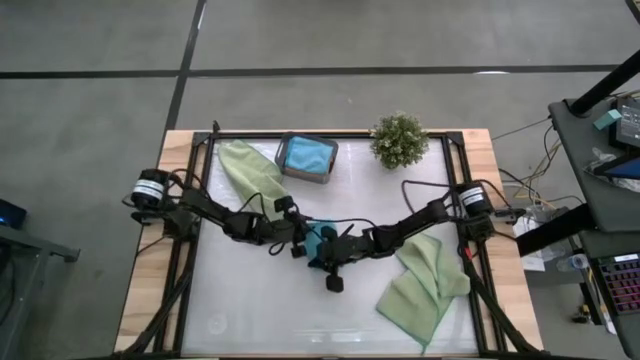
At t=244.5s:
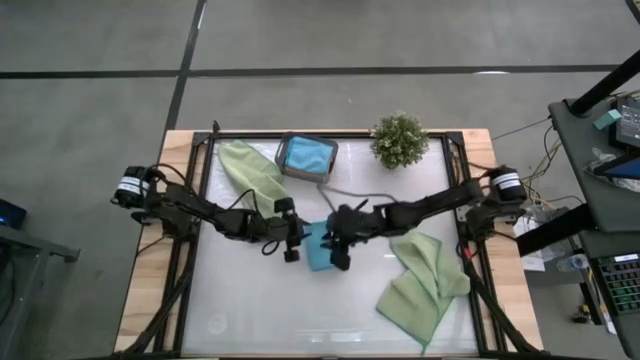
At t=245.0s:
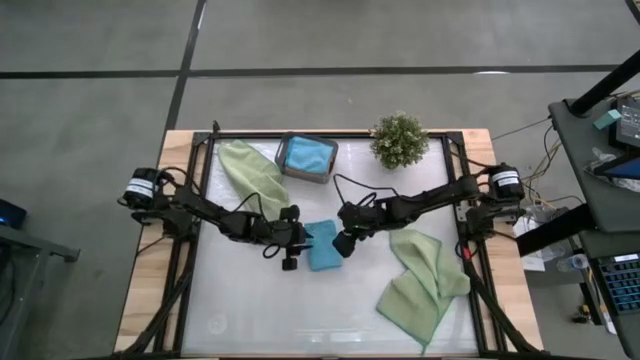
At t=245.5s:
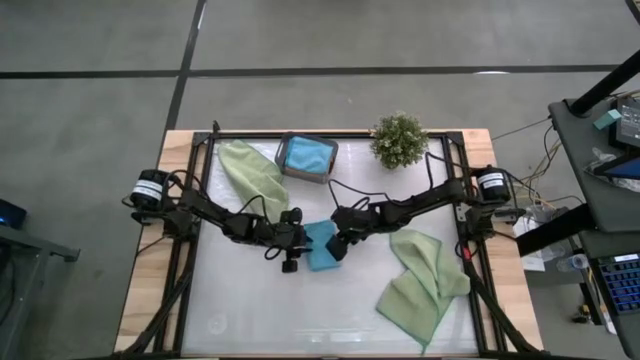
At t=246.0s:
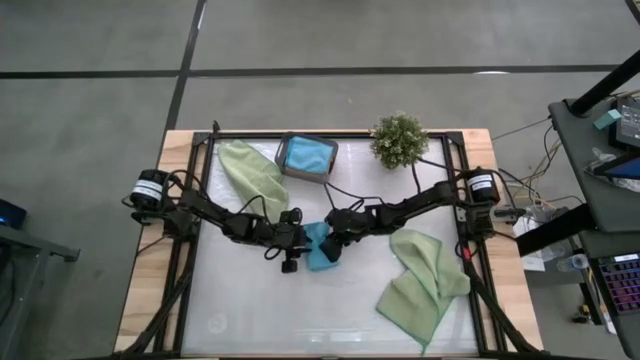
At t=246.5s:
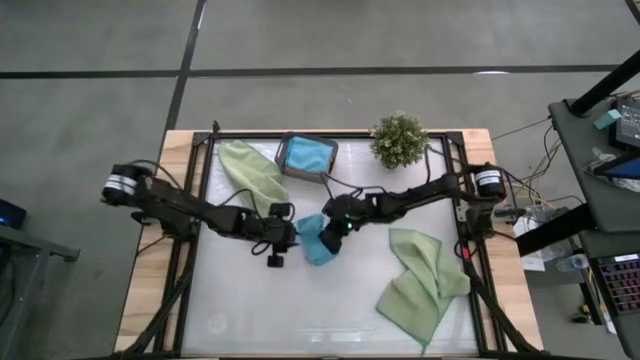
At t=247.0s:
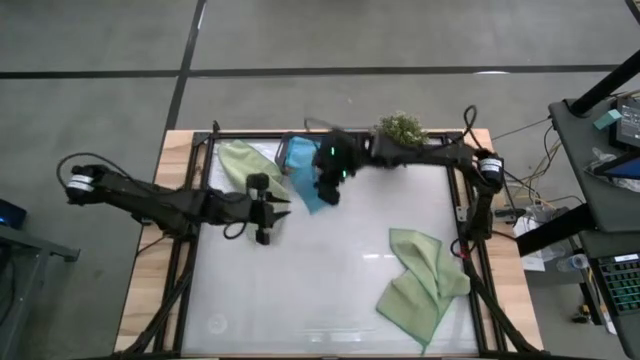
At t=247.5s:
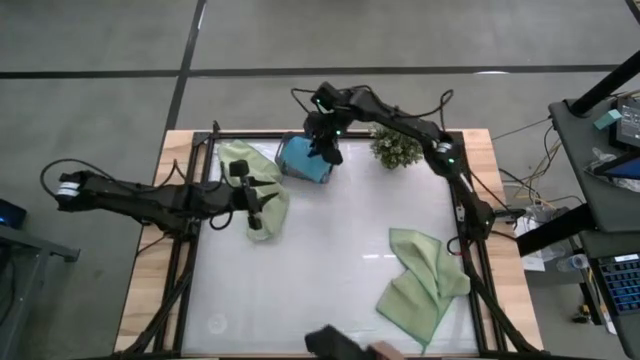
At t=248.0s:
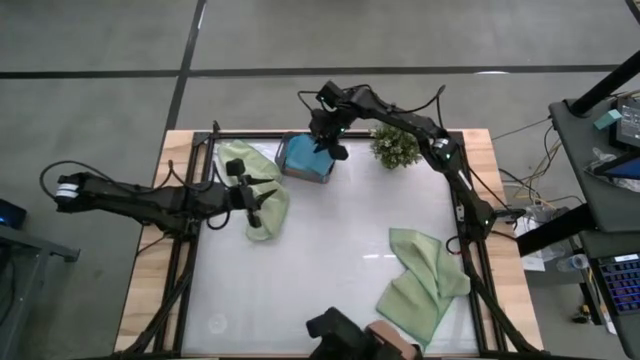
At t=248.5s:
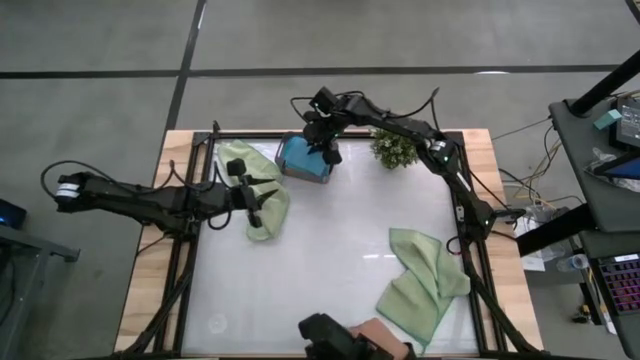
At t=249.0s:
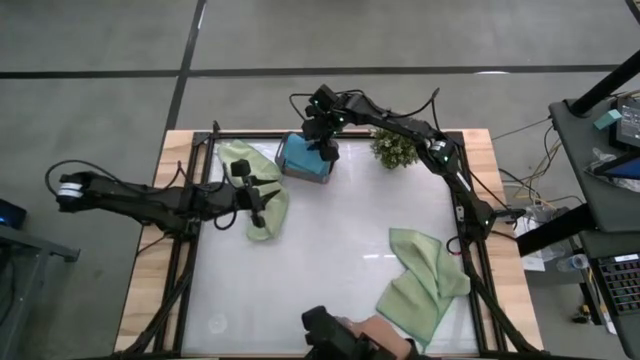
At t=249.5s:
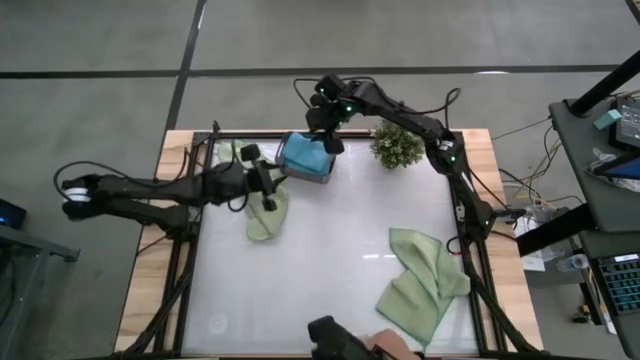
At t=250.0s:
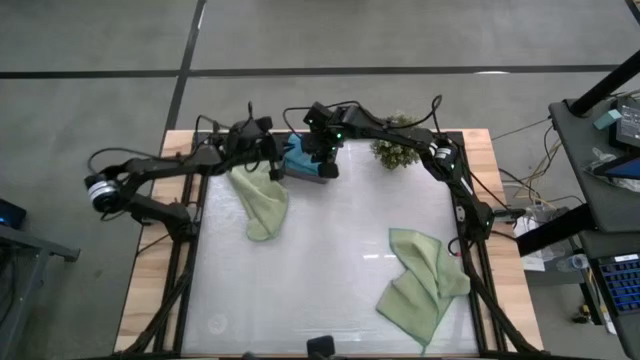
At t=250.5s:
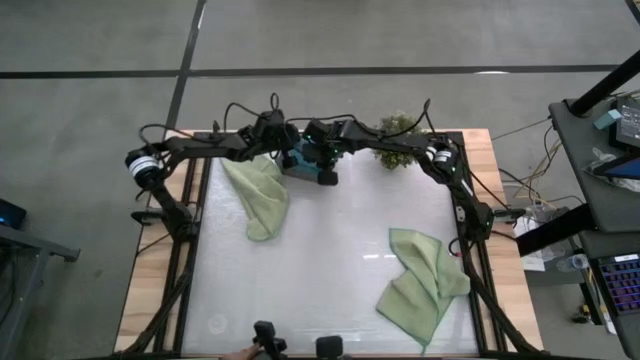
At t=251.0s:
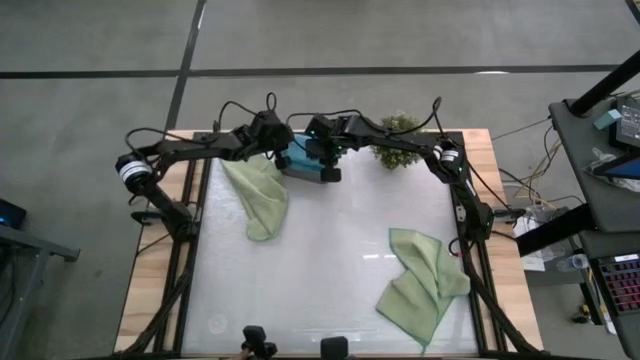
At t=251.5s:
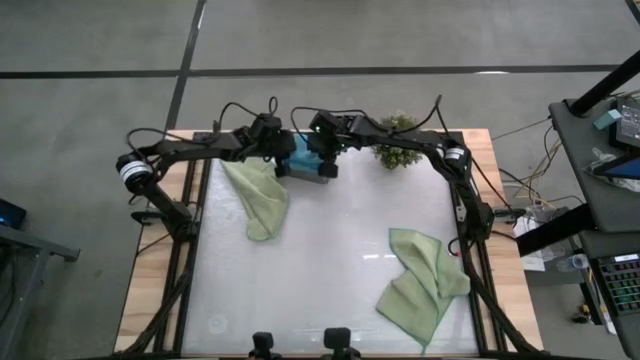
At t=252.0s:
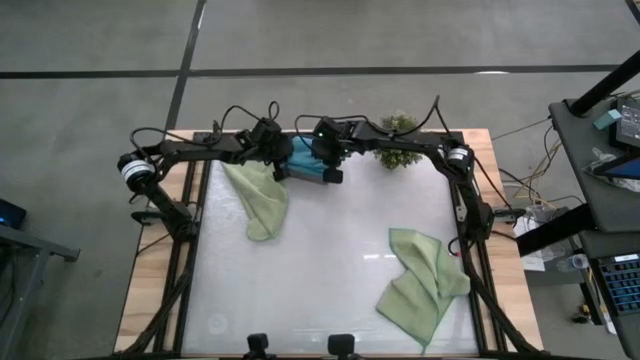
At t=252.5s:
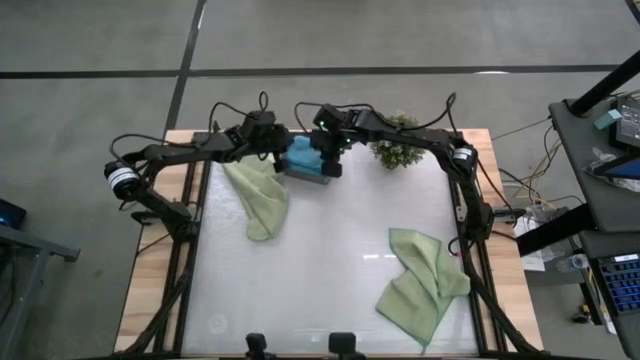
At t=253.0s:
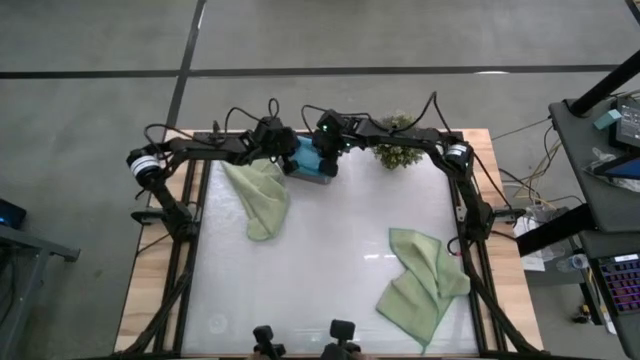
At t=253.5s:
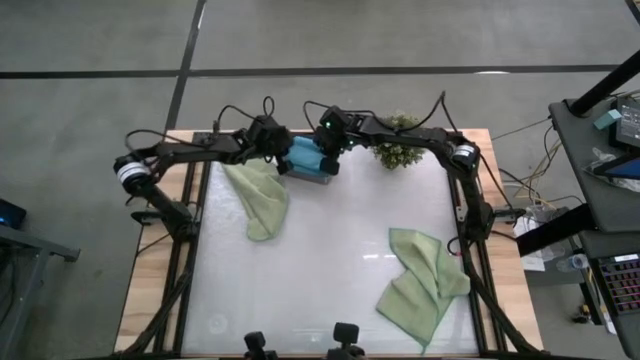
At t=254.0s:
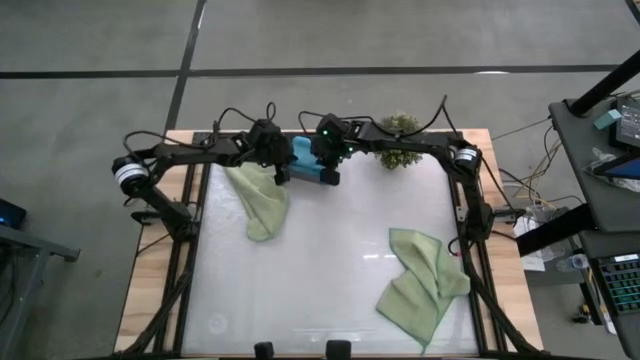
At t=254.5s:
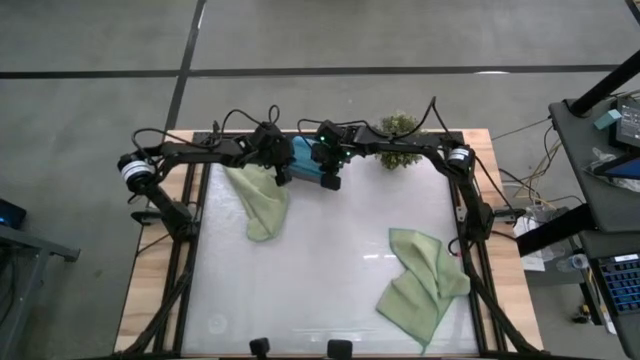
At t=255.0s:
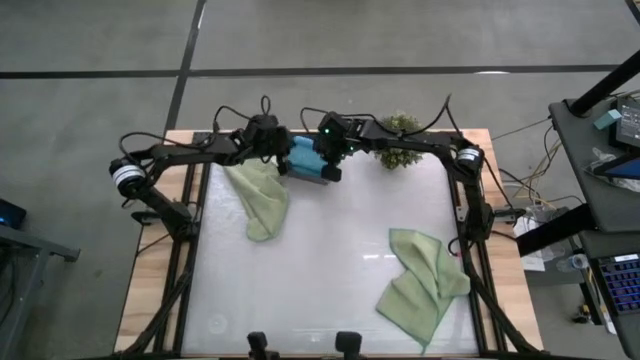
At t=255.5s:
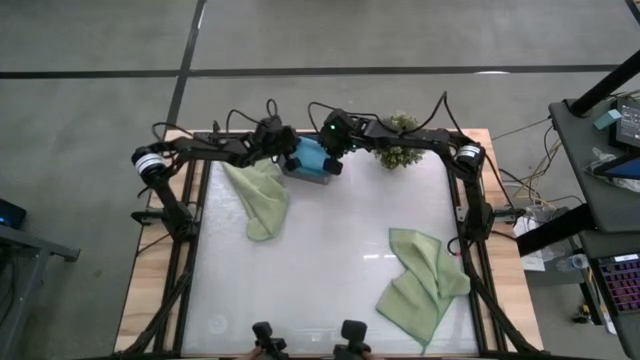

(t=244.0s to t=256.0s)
Task: Fold microfiber towels
Put the folded blue microfiber towel into the black bin

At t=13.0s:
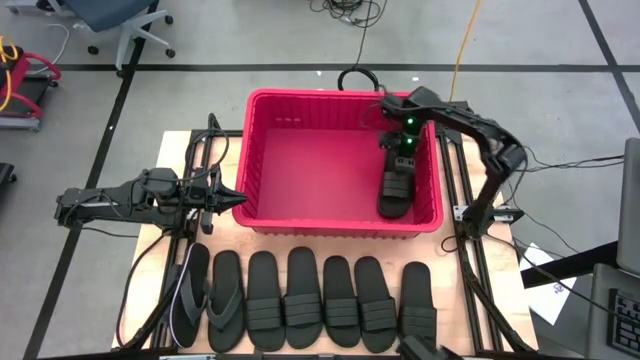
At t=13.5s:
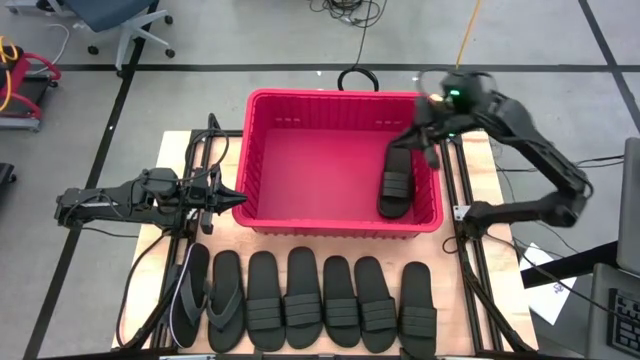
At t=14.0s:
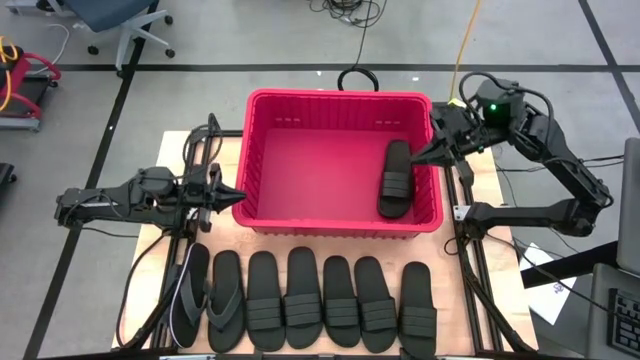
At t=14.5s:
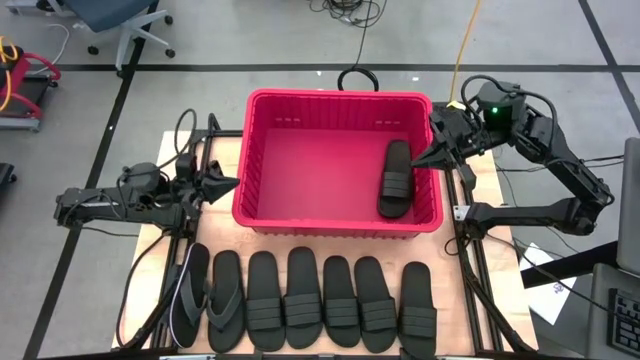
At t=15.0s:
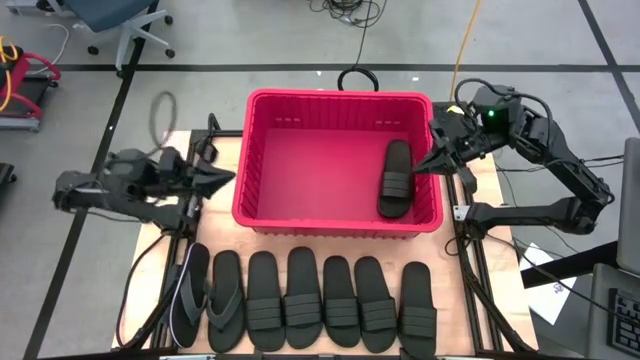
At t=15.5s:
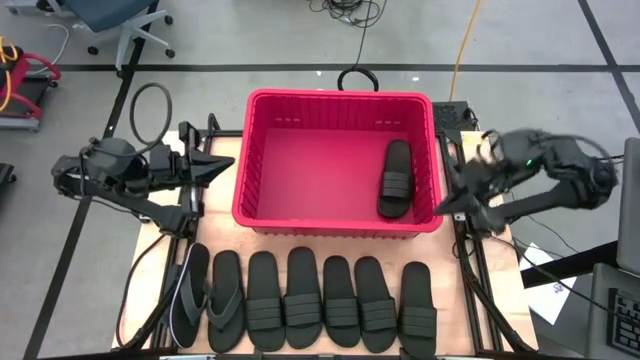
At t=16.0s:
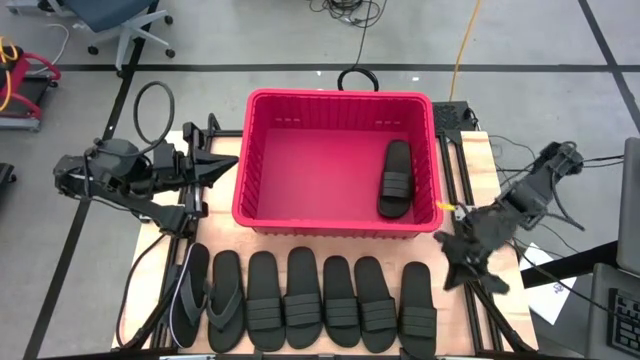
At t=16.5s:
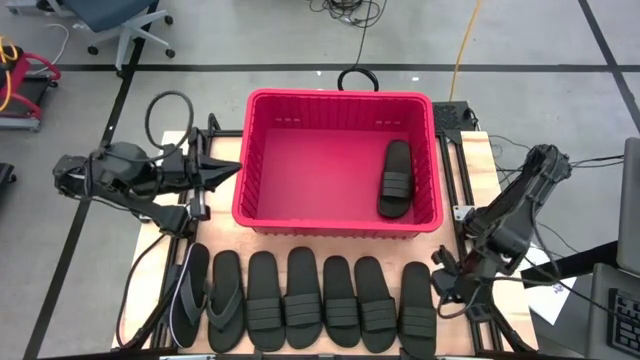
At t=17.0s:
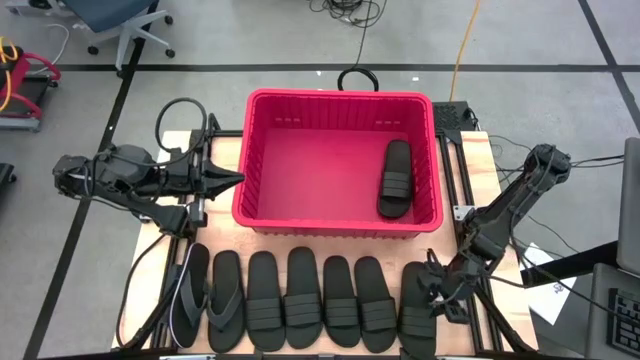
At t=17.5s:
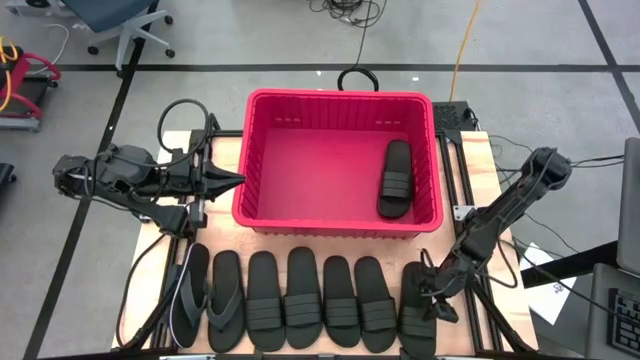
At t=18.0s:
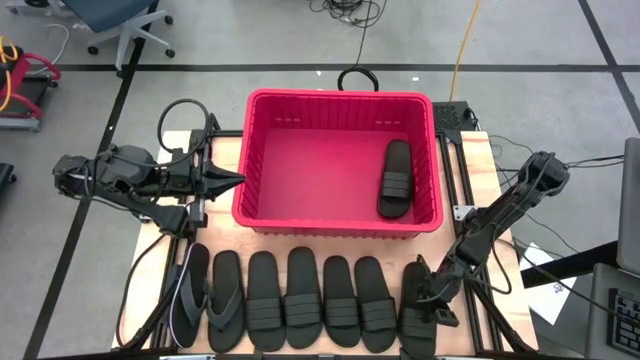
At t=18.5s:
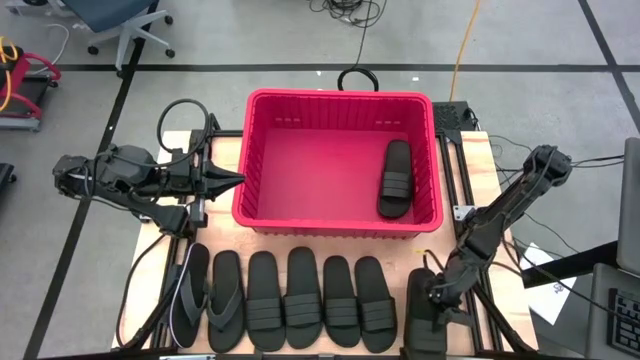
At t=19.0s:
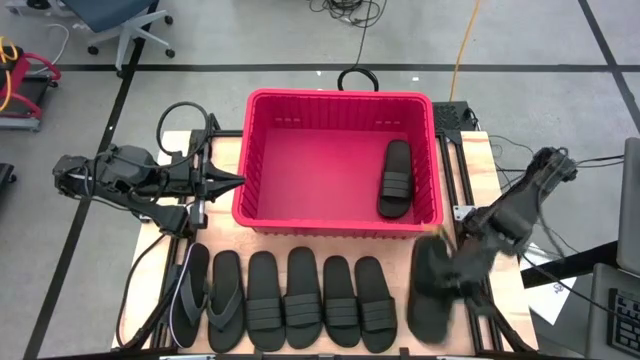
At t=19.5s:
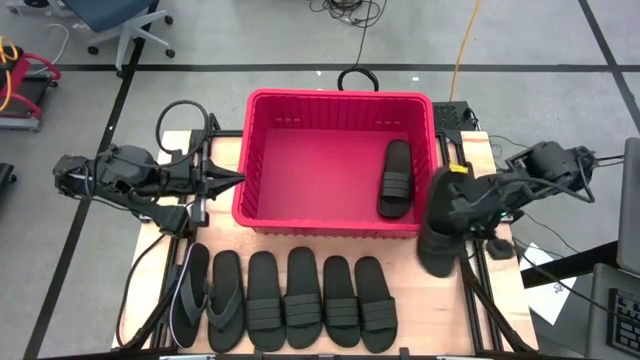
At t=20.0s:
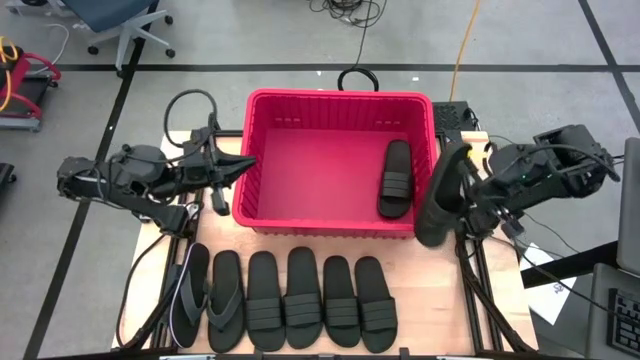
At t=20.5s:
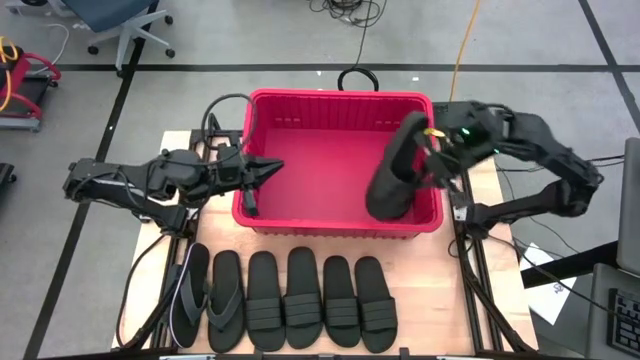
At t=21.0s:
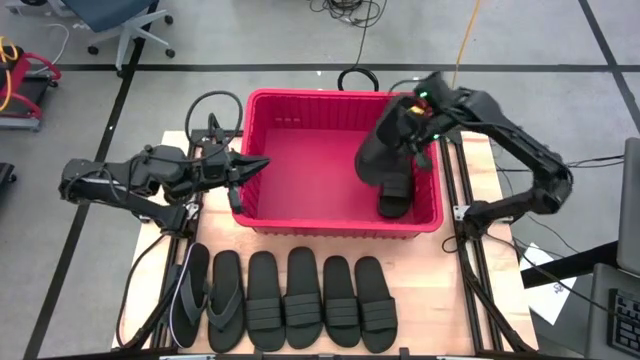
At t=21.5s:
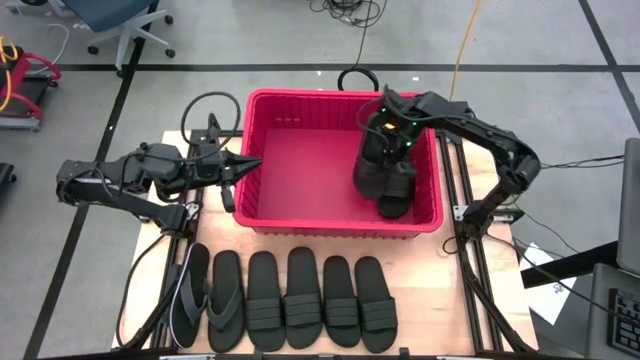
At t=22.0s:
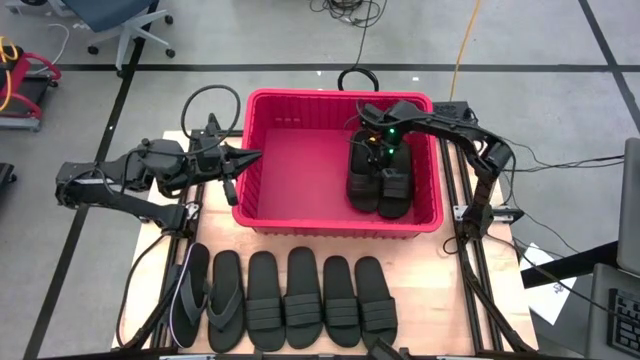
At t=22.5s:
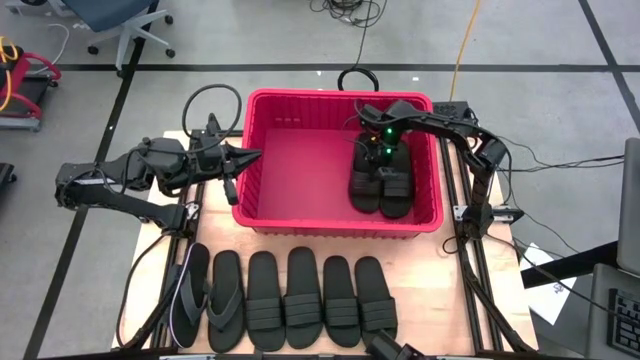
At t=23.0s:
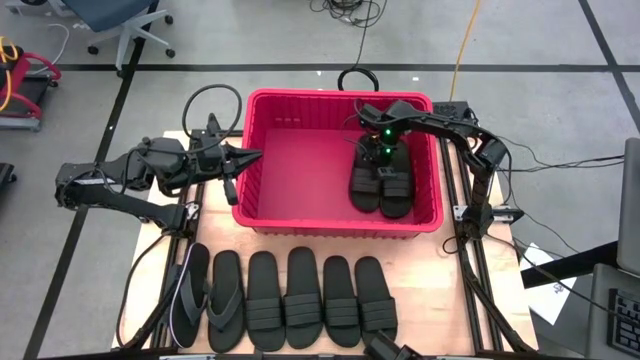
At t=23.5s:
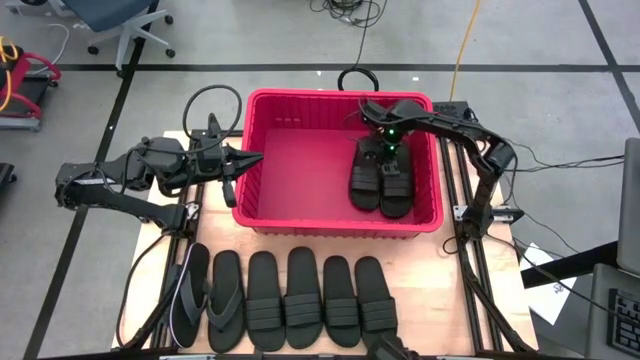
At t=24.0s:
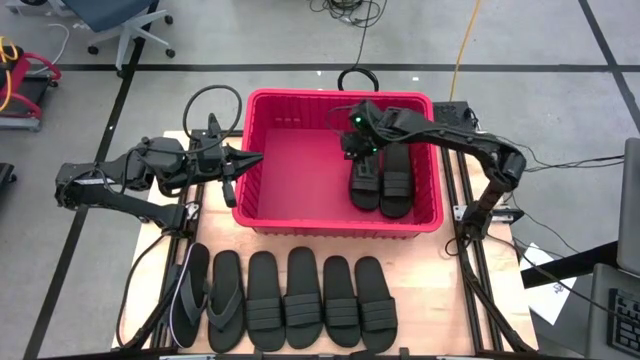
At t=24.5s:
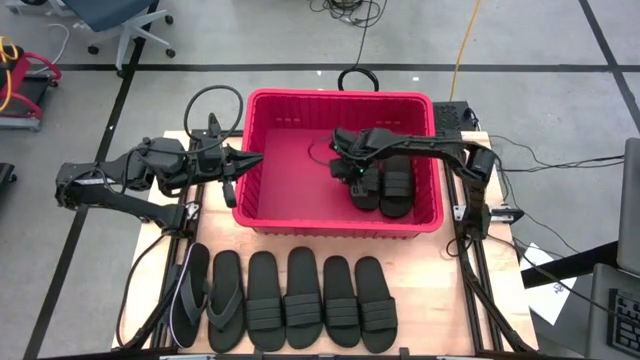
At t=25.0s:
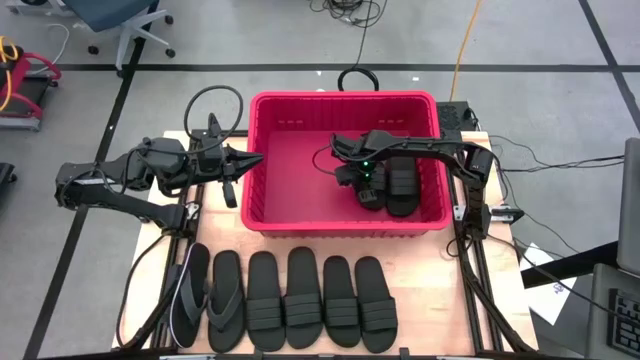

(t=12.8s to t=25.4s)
Task: Pick and place slides into bin
Put the black slide into the red bin
